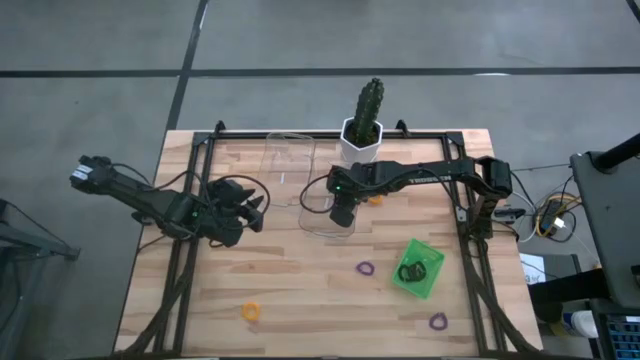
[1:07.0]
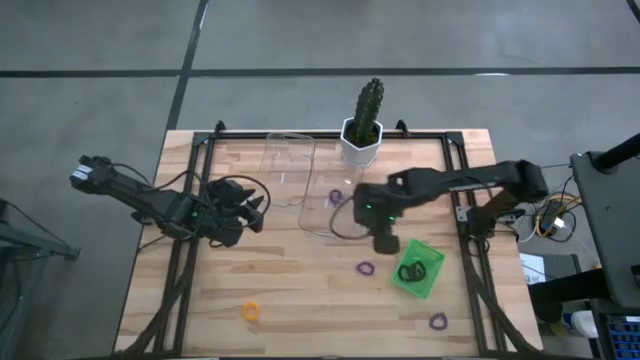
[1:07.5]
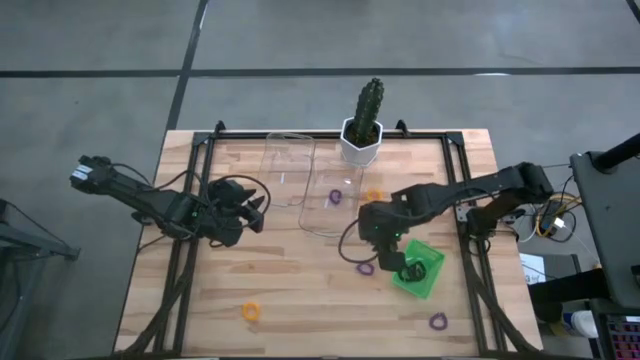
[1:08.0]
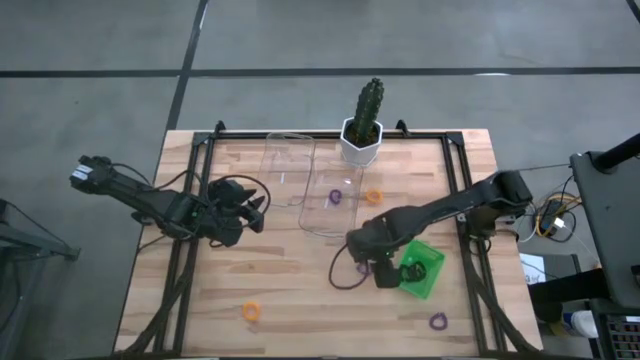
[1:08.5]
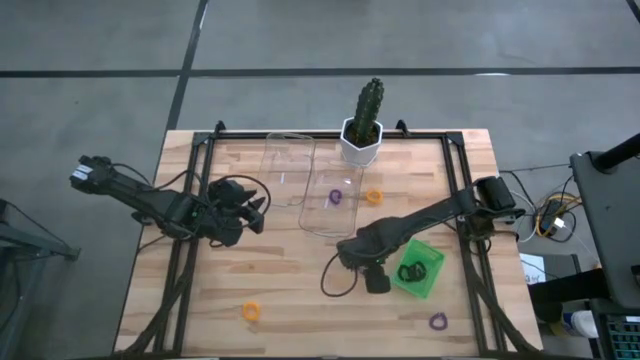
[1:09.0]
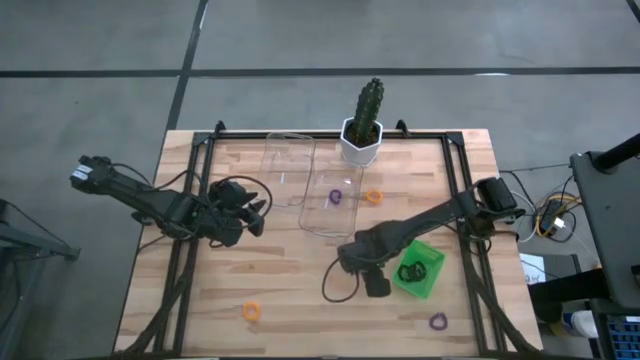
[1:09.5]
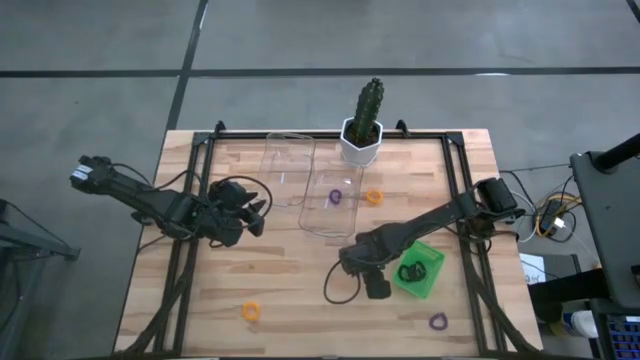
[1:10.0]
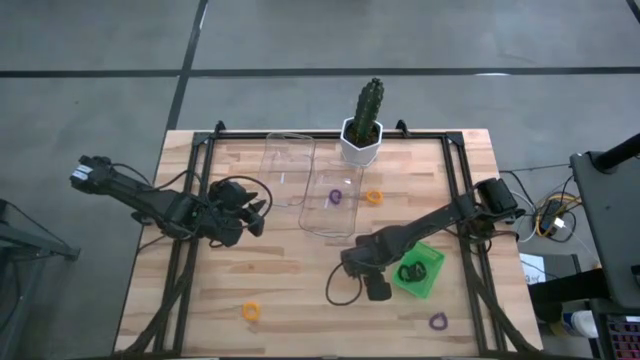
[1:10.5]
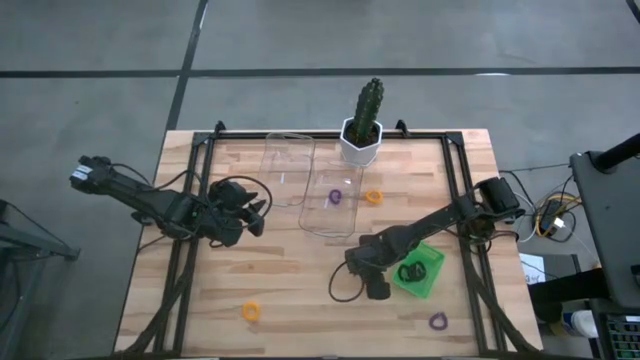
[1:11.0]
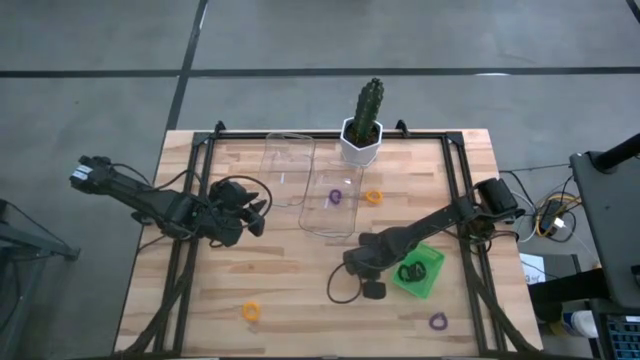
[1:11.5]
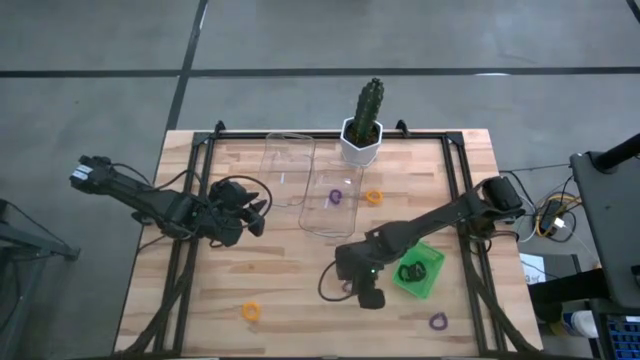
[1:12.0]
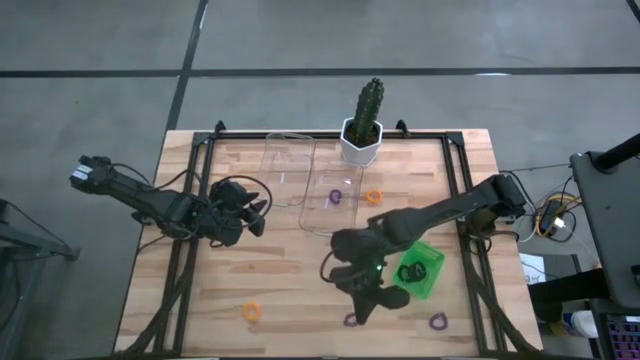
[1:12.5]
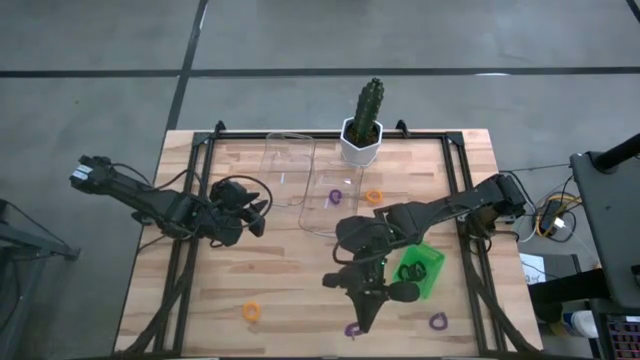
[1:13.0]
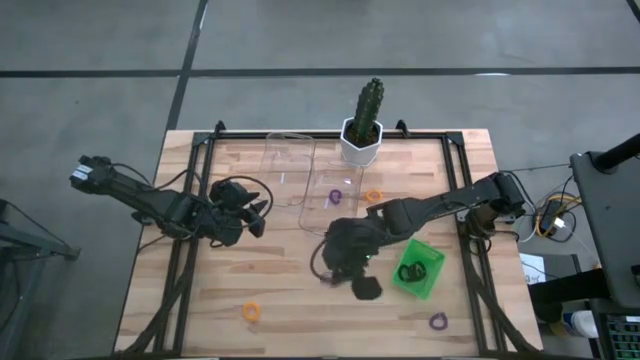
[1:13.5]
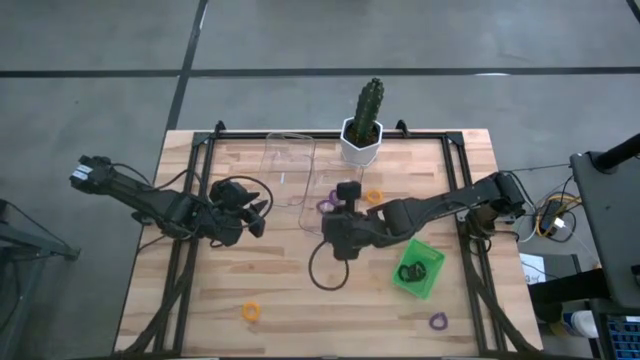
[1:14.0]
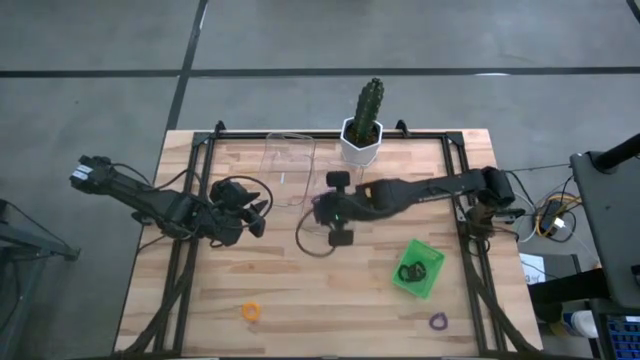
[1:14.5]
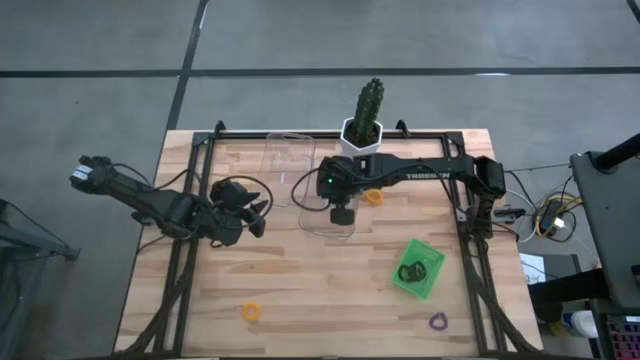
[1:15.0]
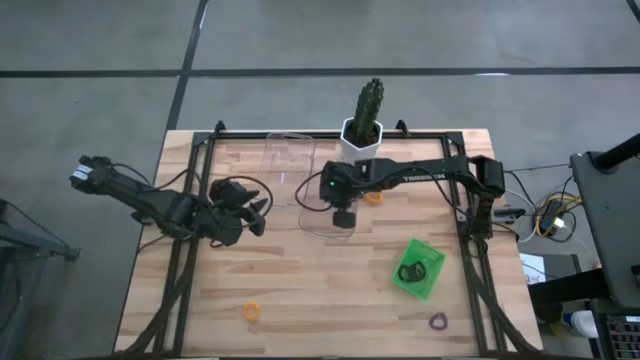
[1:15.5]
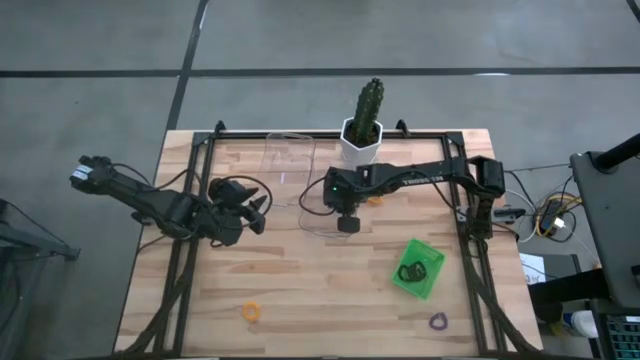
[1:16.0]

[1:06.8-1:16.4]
Task: Sort spring keychains
Put the top violet spring keychain into the right transparent bin

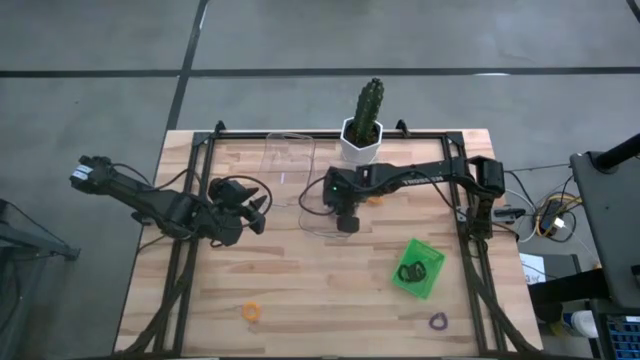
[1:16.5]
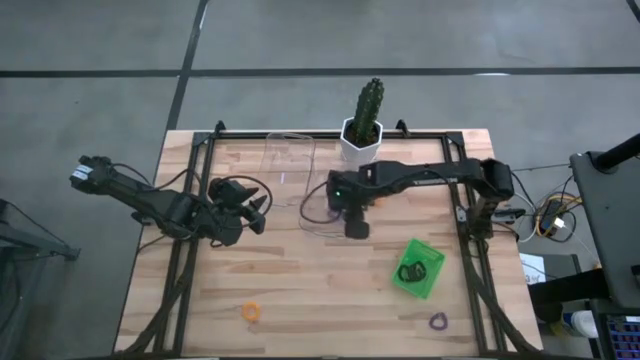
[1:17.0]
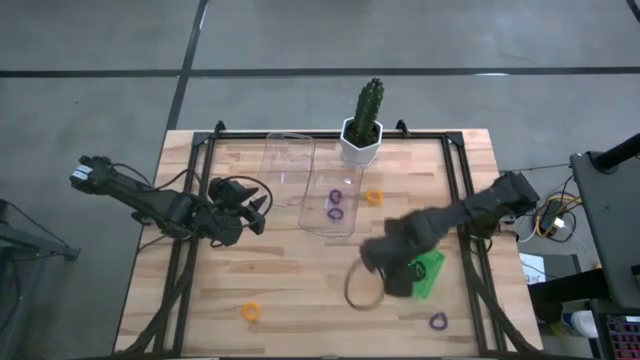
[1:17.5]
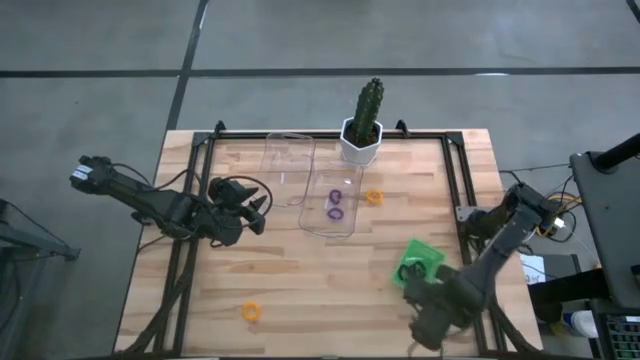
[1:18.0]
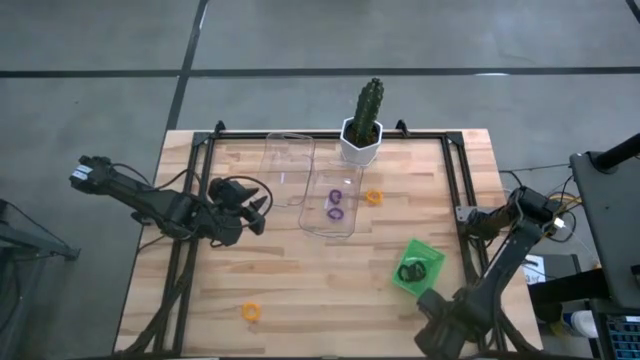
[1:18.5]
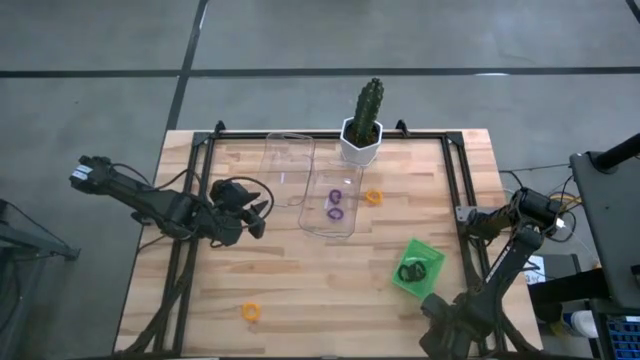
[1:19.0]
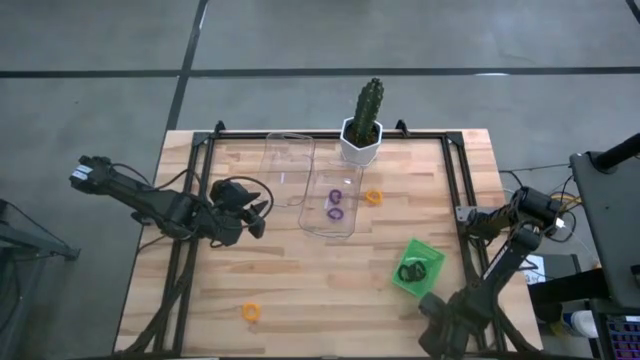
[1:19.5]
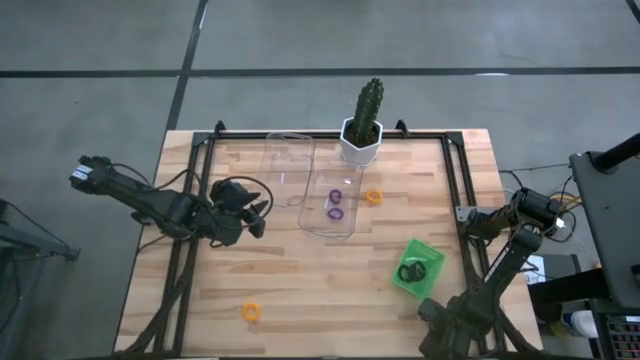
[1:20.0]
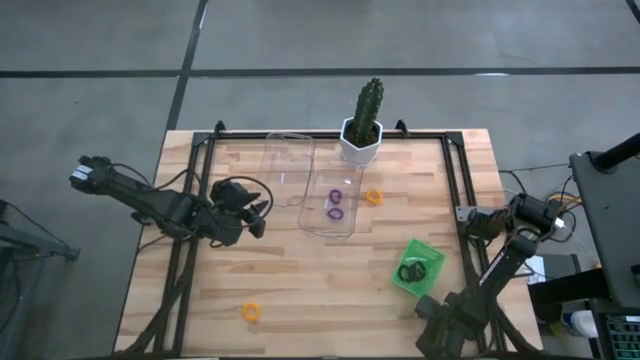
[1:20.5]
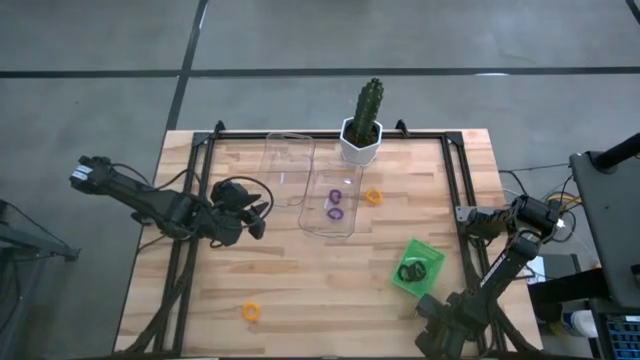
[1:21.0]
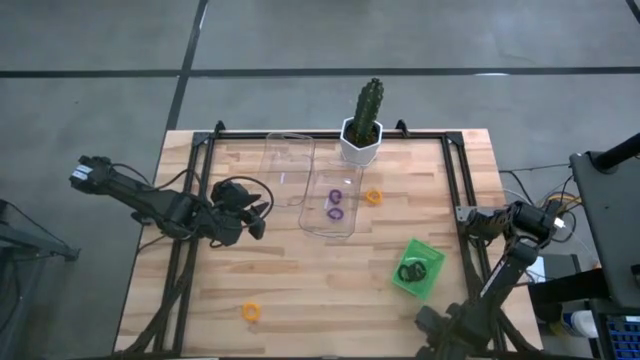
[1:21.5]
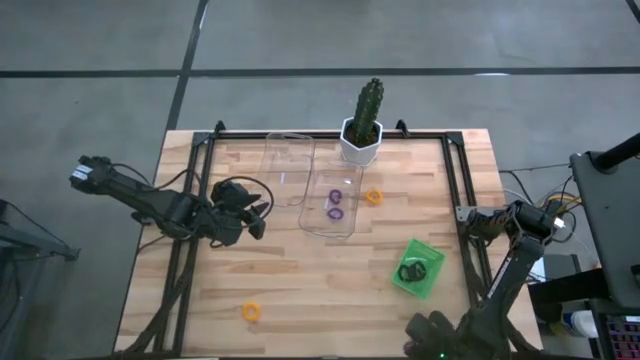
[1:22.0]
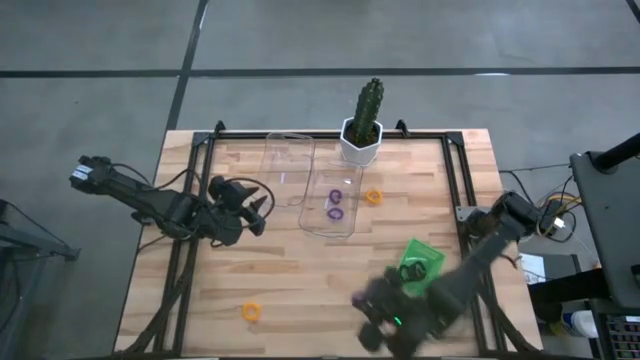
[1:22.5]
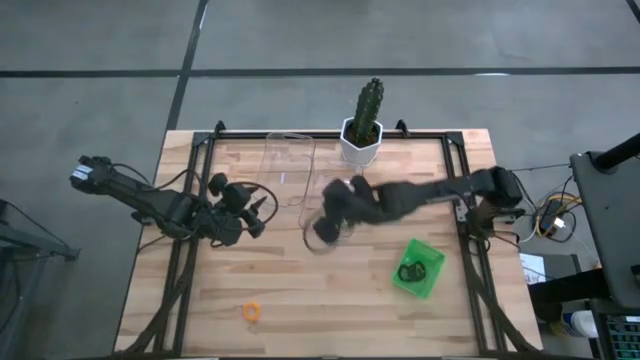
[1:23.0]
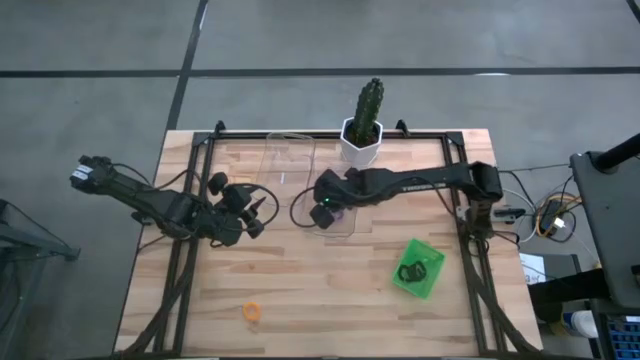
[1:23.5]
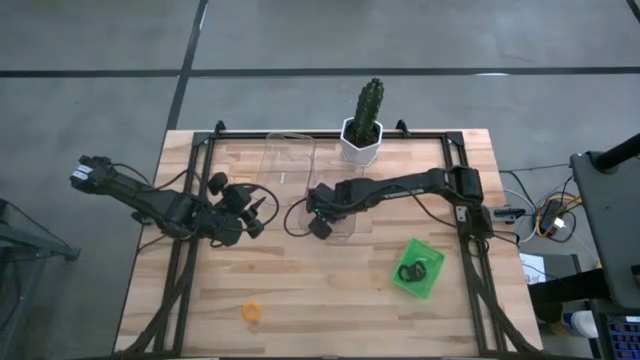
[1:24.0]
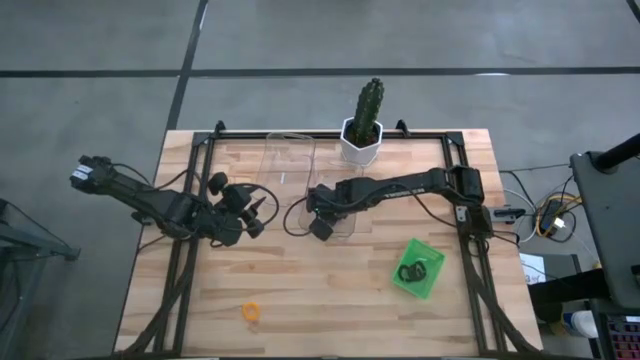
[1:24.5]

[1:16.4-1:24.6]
Put the violet spring keychain into the right transparent bin

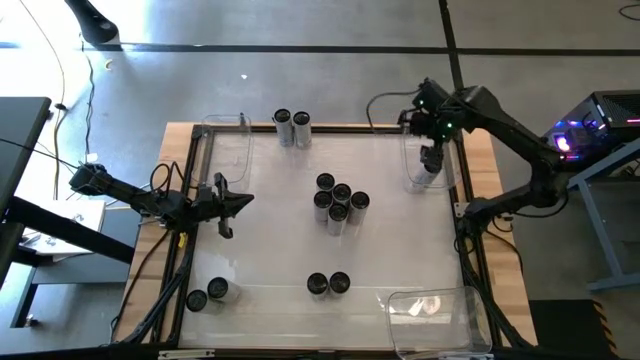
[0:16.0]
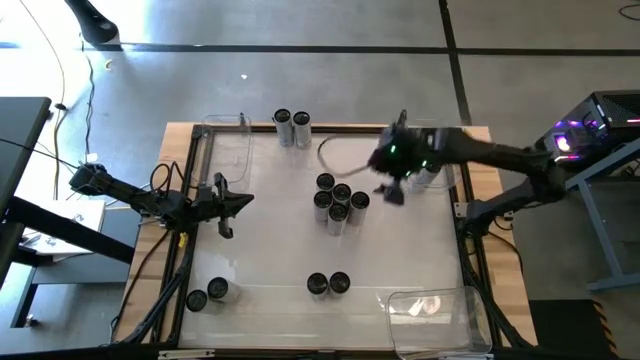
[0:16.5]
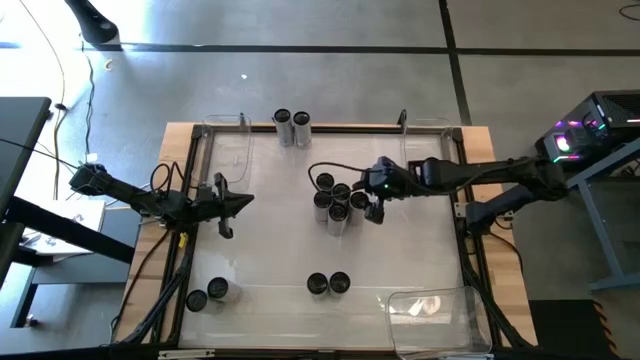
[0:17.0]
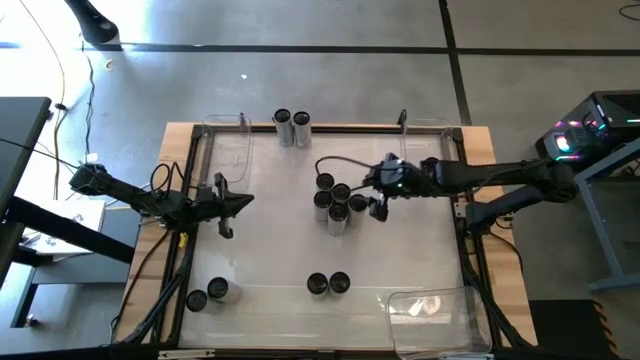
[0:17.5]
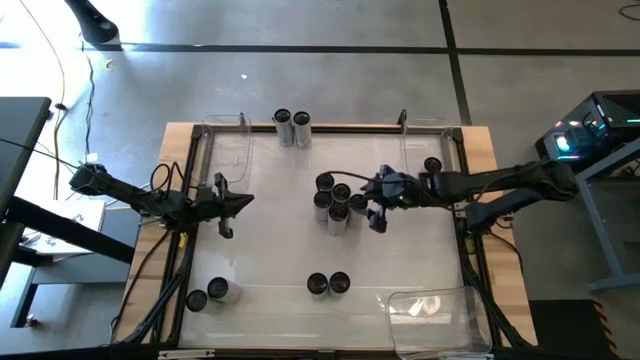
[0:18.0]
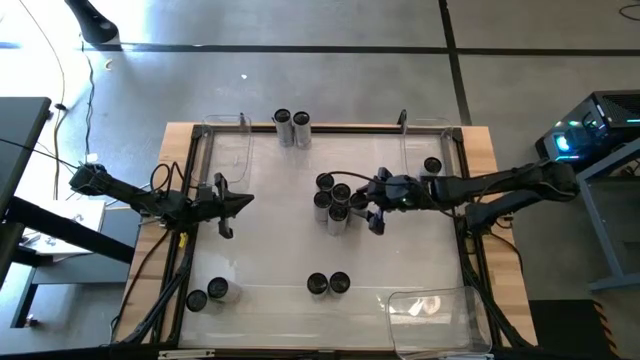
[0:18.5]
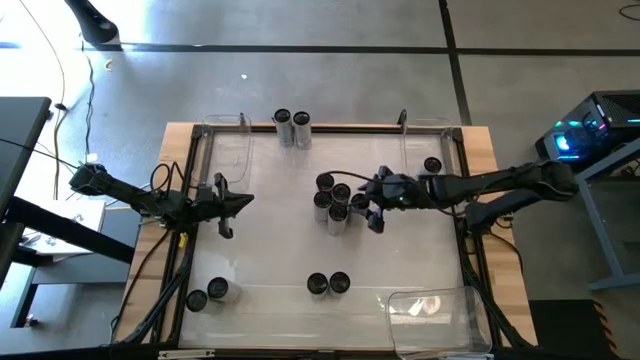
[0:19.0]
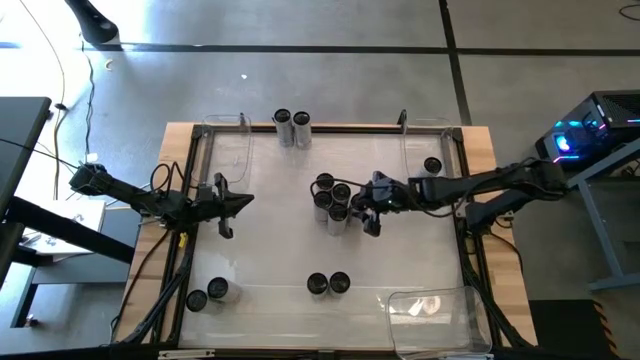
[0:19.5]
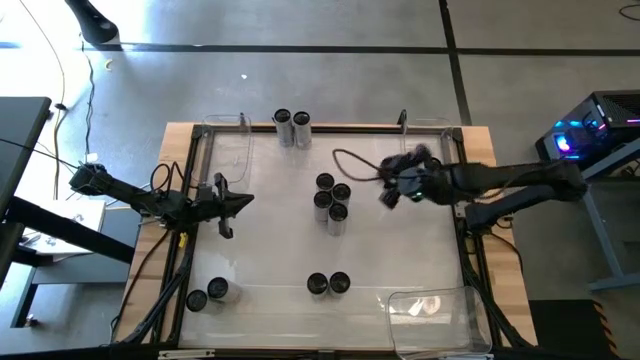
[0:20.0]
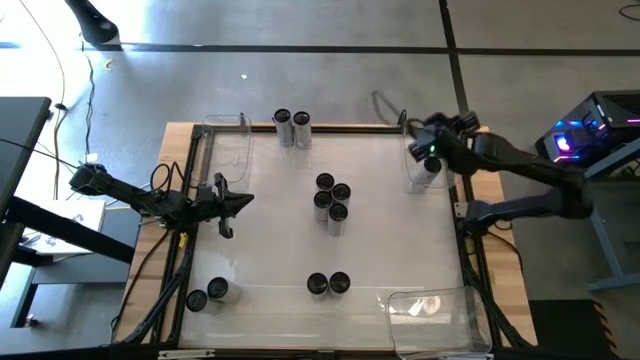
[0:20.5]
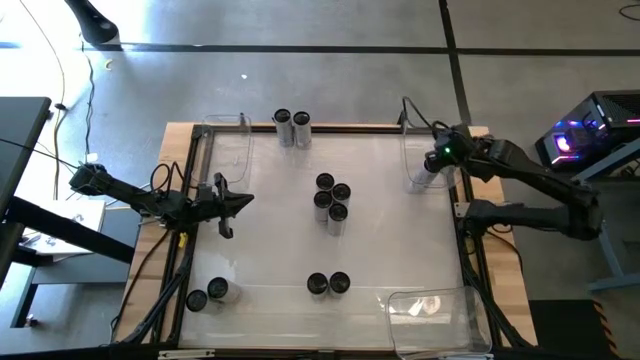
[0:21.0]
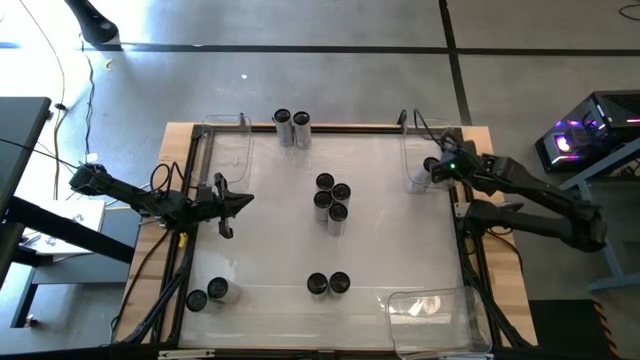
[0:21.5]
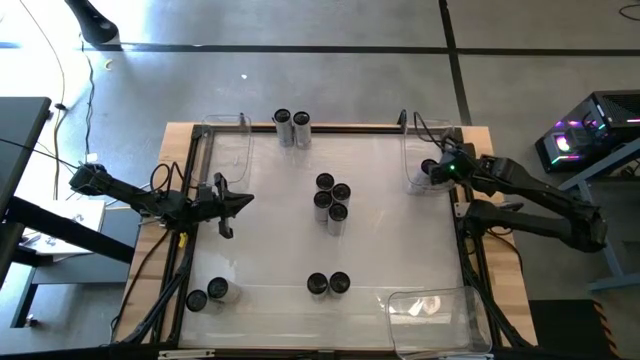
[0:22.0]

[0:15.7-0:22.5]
Task: Sort soda cans
Put the yellow soda can into the top right transparent bin
